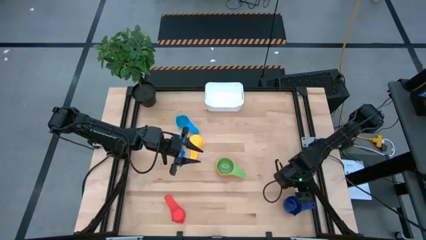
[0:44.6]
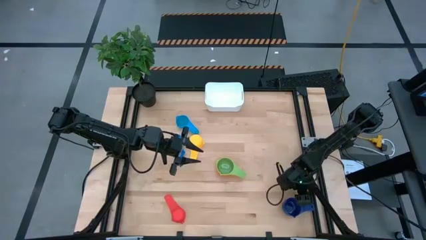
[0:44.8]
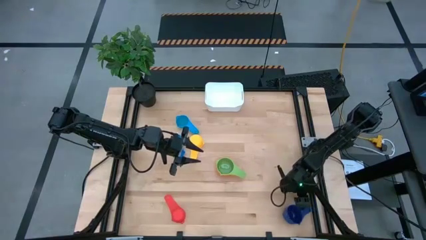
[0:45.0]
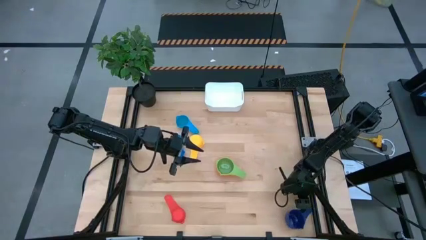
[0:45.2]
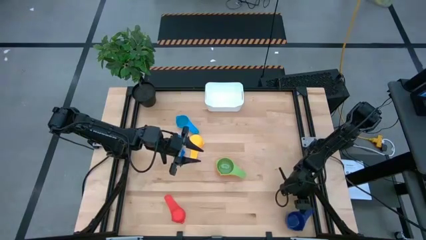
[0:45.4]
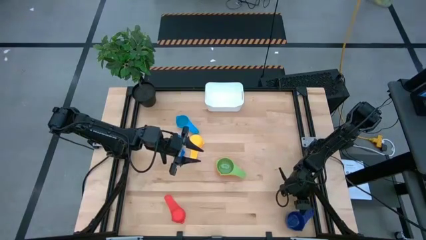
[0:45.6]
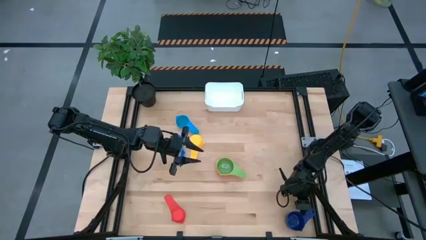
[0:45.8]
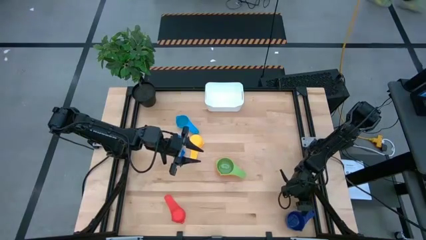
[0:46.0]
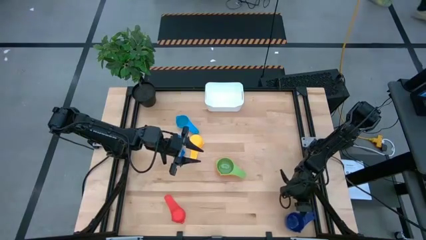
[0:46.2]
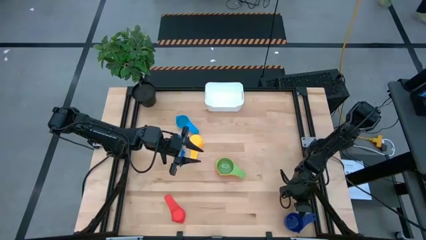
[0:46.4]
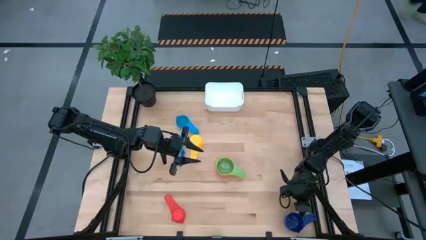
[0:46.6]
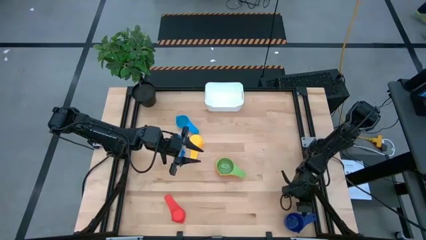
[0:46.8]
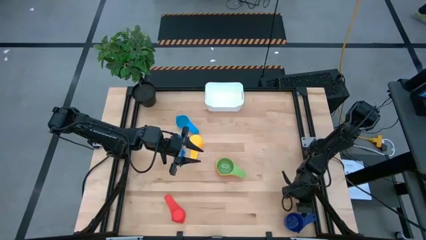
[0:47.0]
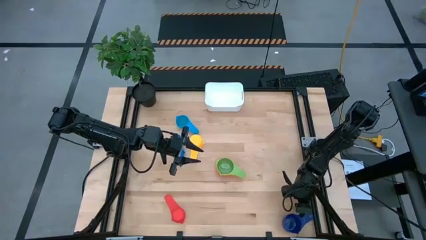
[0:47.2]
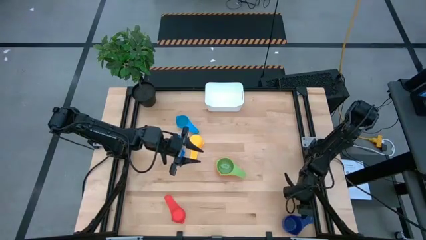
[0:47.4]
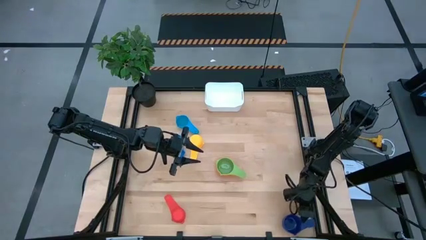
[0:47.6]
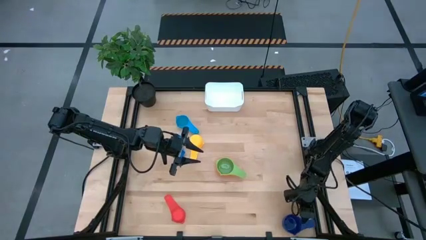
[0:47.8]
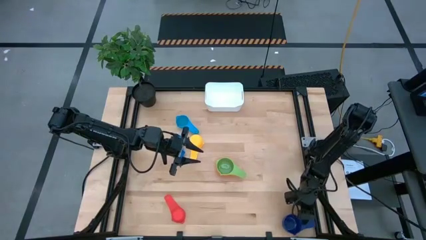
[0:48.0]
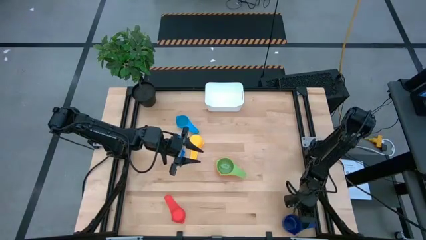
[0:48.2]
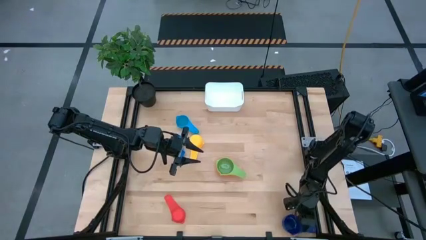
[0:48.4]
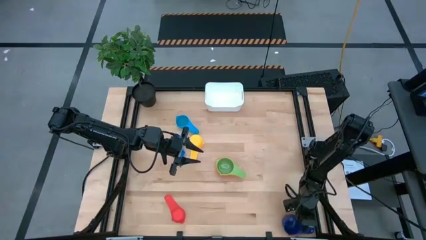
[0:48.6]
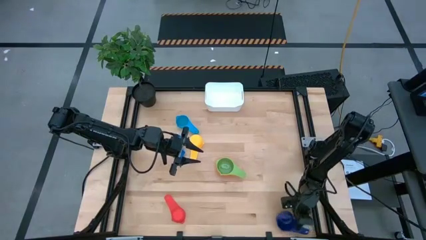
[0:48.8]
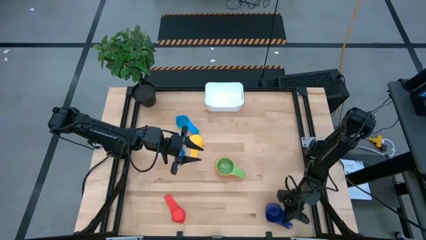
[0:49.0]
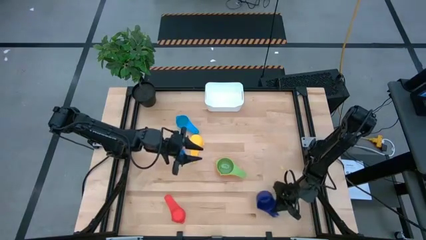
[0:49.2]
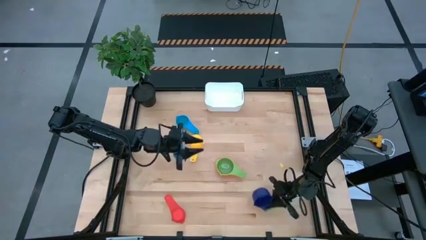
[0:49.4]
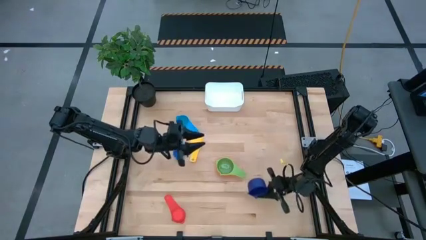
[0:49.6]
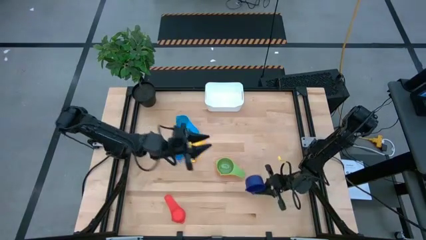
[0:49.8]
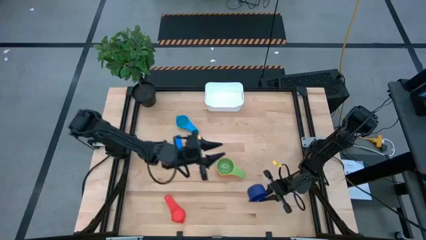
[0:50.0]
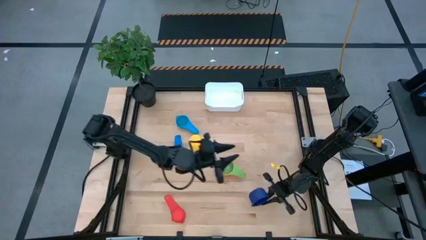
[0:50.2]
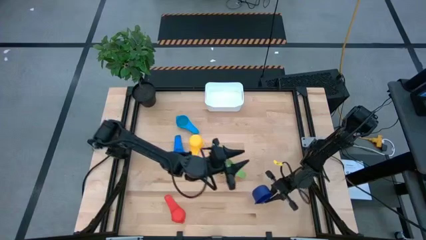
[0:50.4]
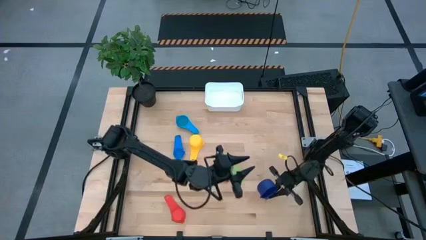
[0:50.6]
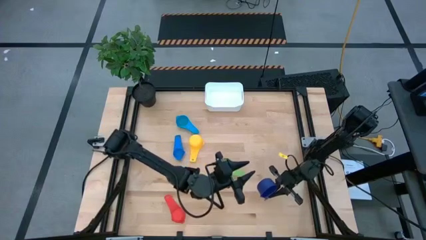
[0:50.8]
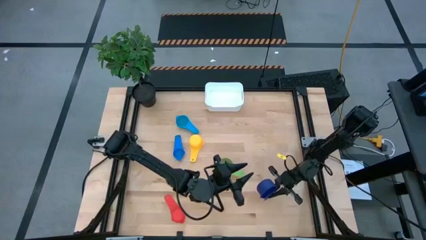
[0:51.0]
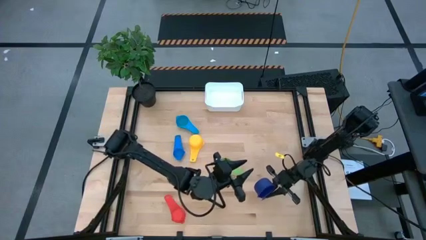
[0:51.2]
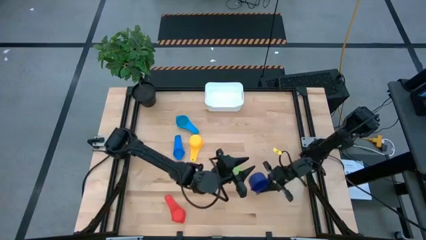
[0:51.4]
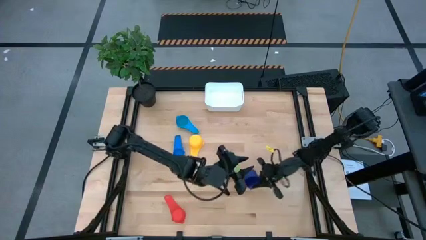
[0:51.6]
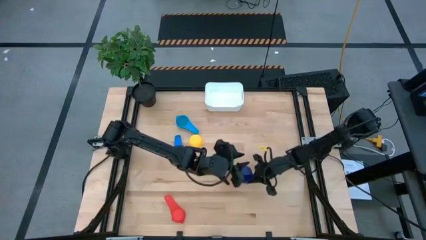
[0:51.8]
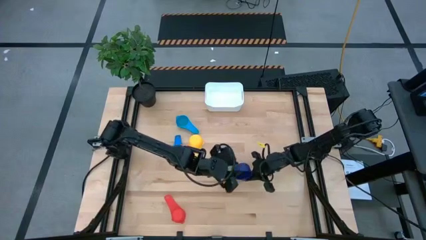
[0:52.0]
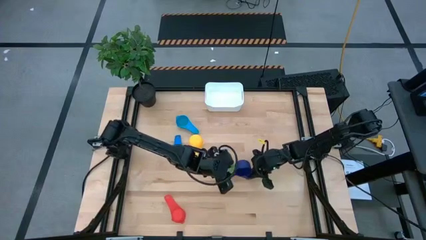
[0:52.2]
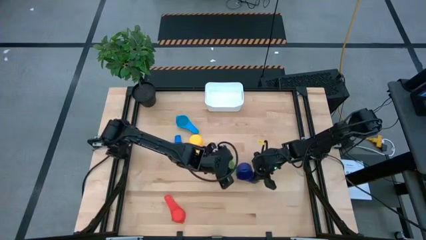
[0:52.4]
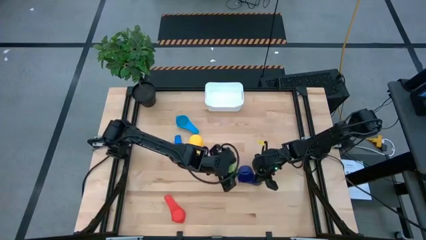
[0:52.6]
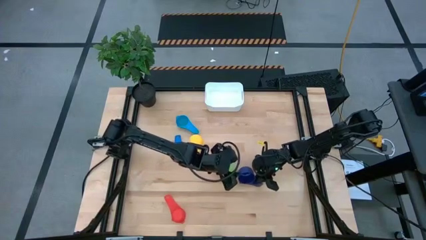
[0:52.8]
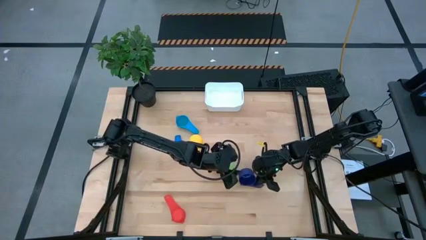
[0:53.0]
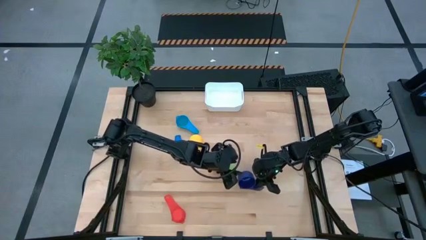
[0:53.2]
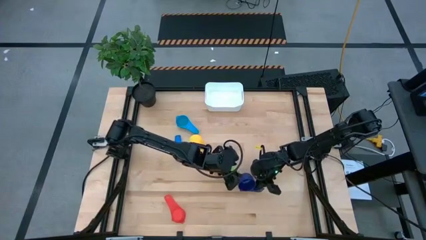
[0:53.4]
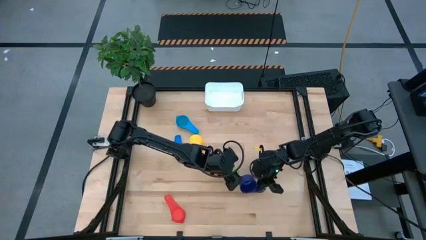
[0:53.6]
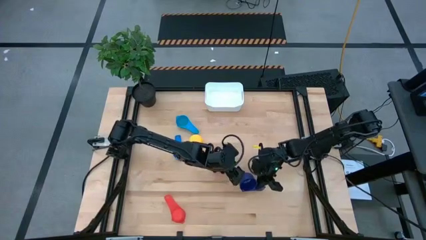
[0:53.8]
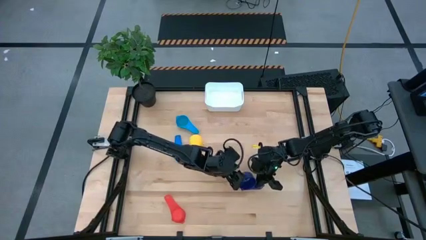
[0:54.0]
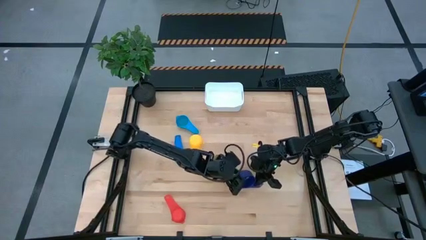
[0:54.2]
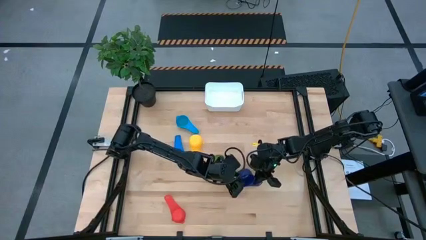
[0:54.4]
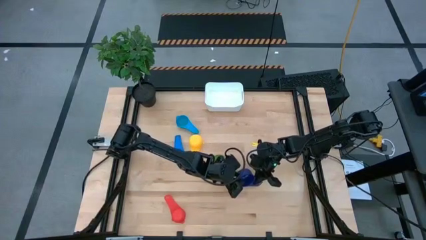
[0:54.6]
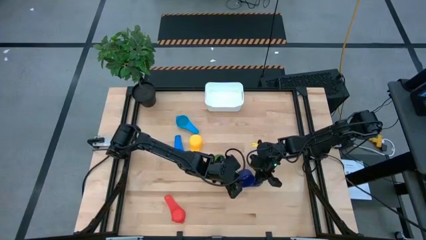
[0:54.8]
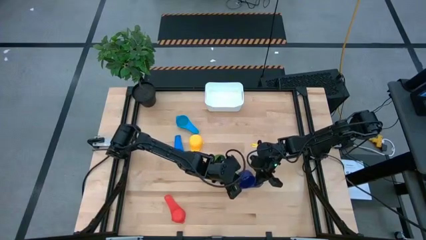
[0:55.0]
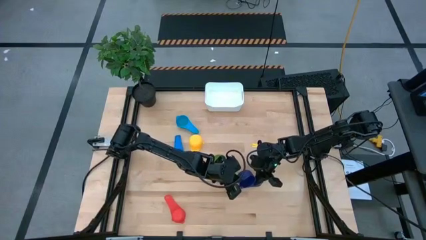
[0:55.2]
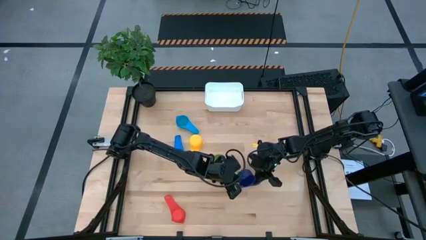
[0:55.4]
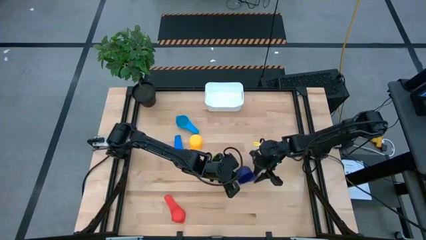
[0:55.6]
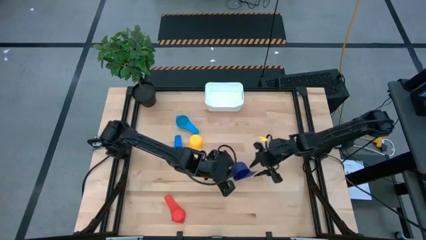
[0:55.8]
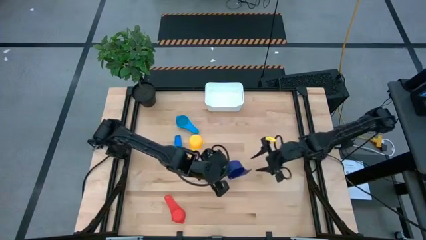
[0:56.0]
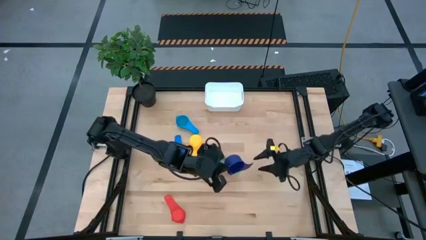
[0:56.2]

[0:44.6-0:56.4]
Task: Nest measuring cups in basket
Stack the dark blue measuring cup on top of the green measuring cup

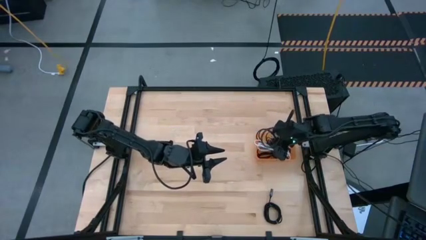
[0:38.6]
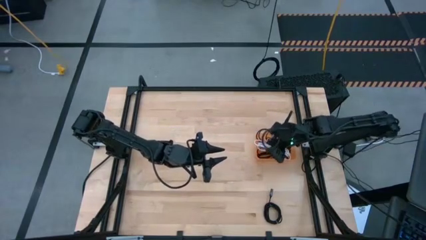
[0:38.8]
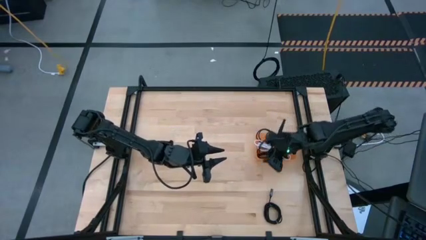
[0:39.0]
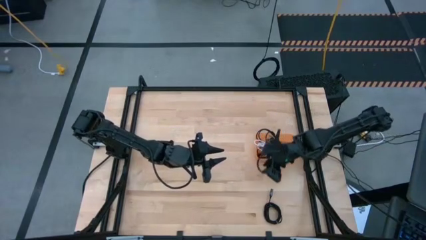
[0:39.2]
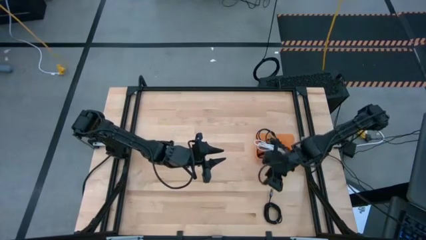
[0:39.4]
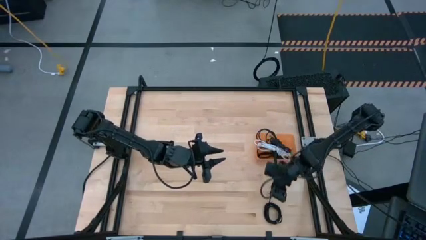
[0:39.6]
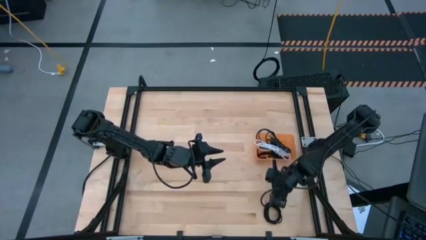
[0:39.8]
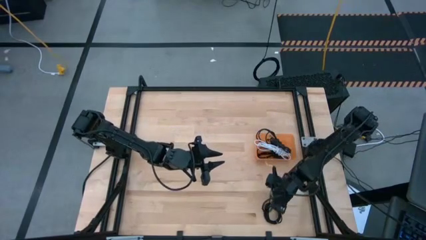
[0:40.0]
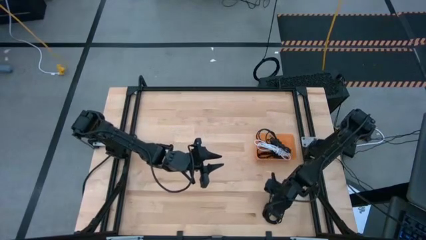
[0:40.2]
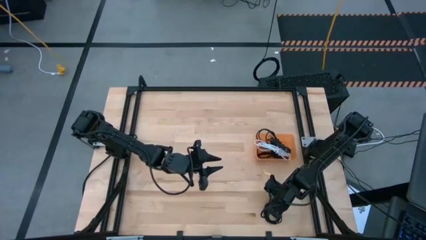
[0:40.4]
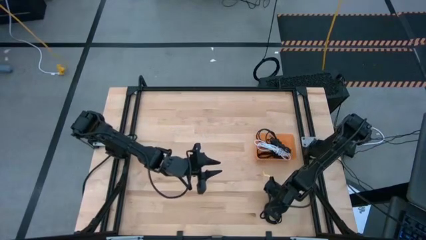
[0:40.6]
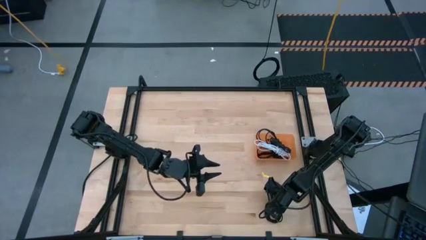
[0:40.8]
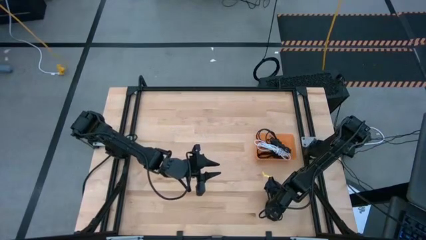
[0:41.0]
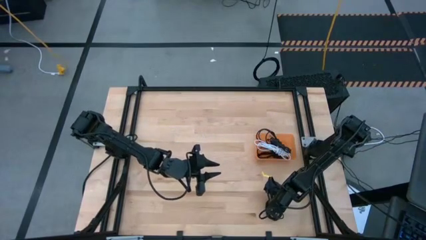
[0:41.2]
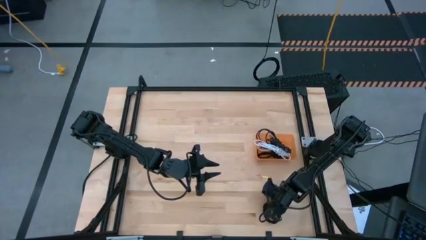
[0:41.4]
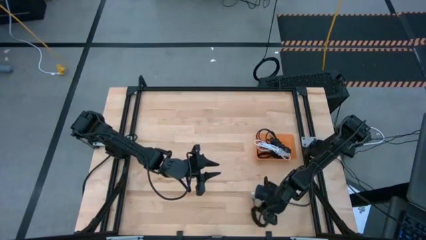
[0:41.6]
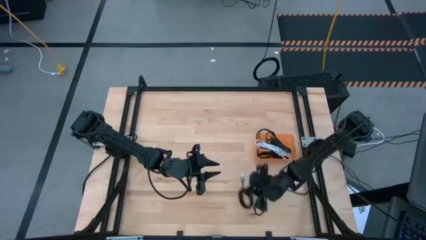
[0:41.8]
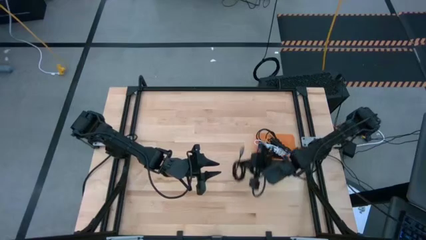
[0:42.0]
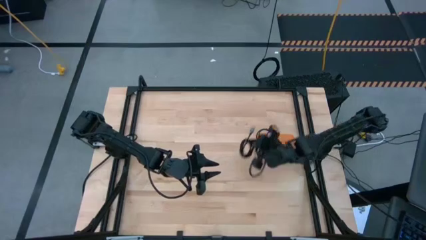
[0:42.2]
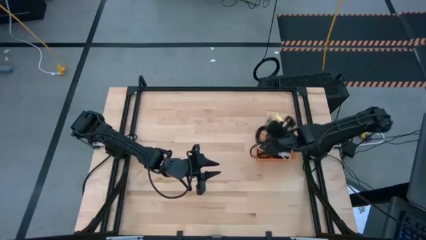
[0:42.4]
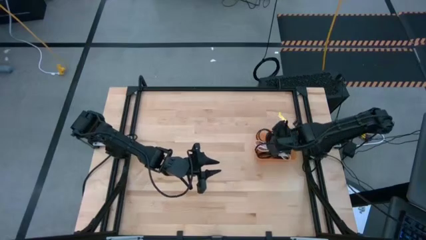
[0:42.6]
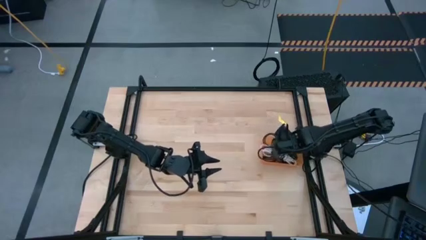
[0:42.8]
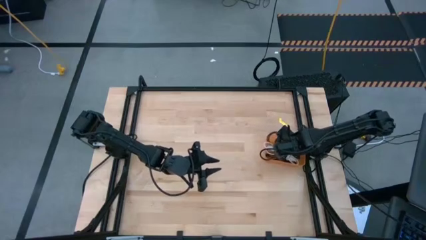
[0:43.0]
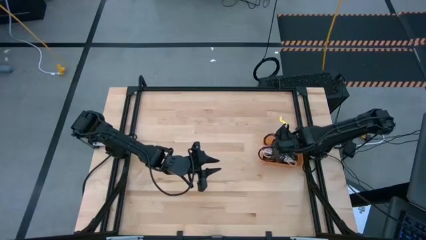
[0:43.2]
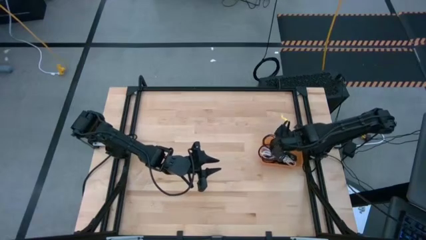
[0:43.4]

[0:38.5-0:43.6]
Task: Pick and place USB-C Cables
Put the black charger cable into the bin
